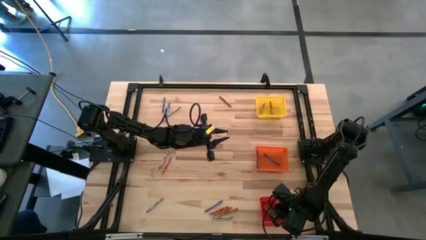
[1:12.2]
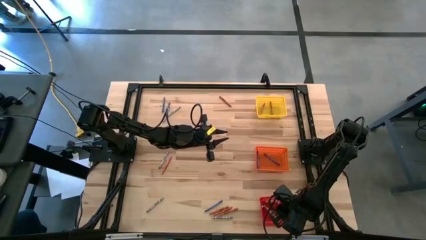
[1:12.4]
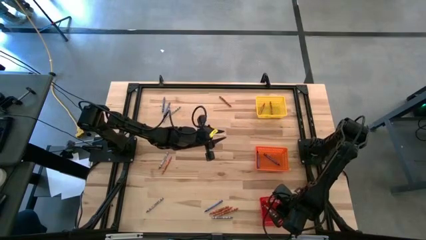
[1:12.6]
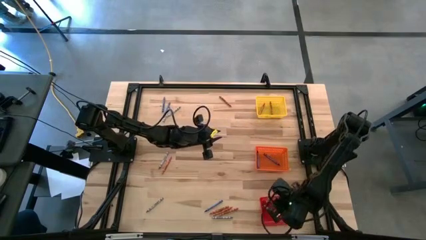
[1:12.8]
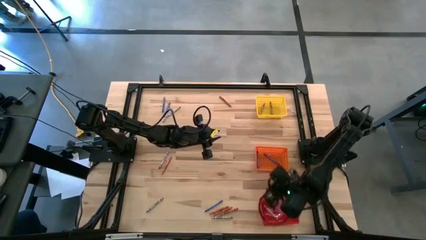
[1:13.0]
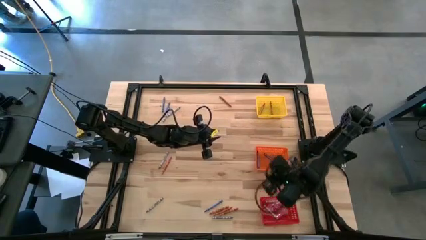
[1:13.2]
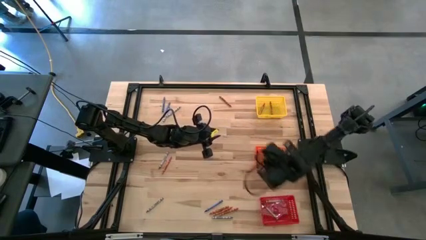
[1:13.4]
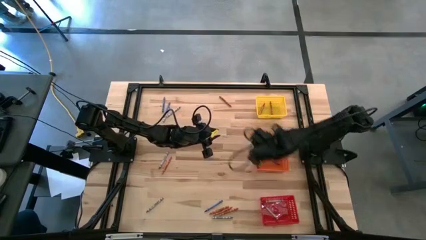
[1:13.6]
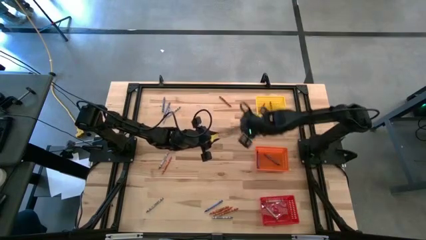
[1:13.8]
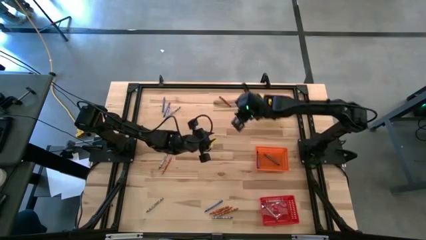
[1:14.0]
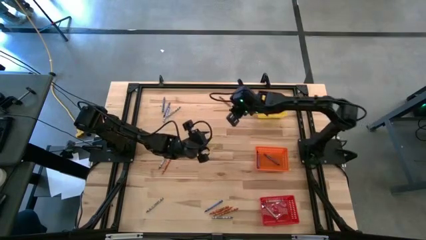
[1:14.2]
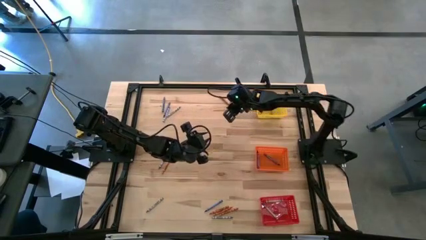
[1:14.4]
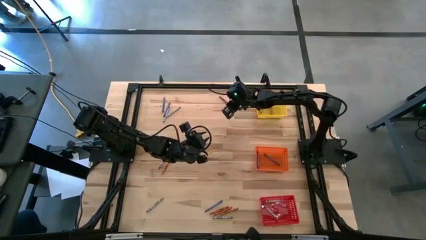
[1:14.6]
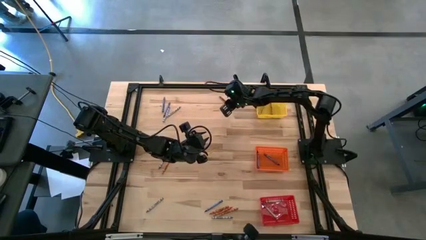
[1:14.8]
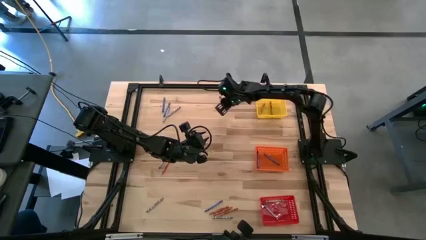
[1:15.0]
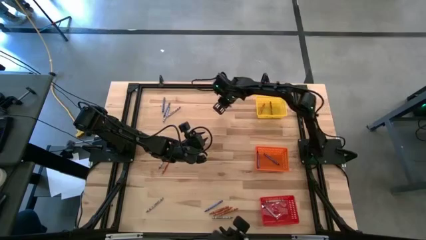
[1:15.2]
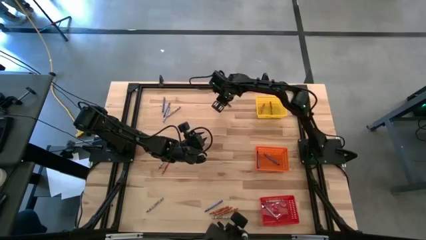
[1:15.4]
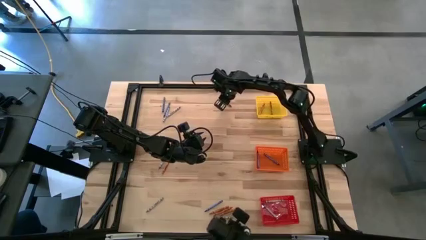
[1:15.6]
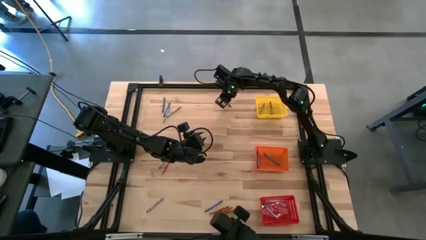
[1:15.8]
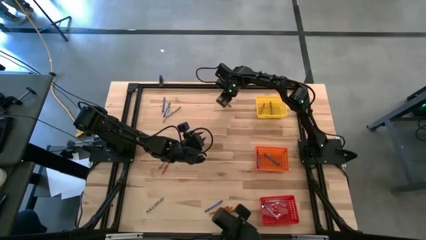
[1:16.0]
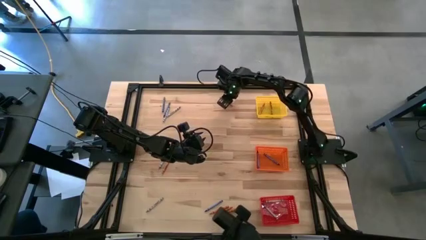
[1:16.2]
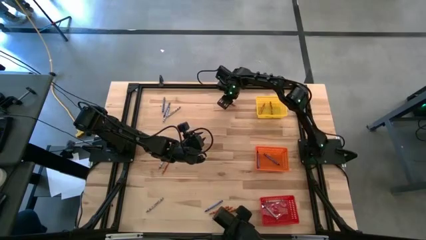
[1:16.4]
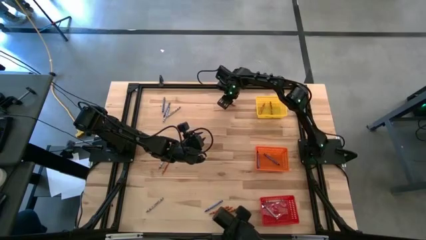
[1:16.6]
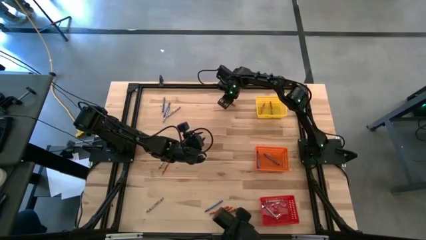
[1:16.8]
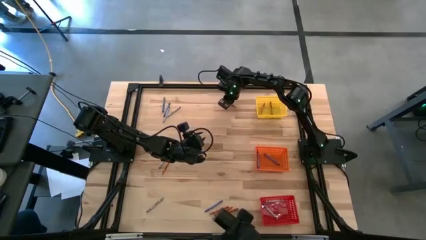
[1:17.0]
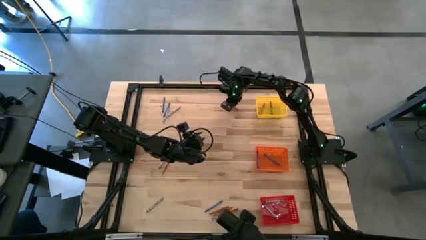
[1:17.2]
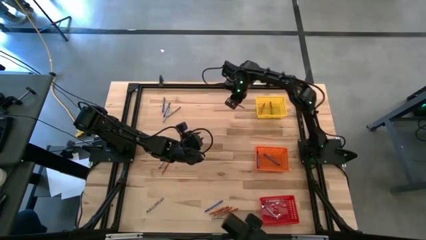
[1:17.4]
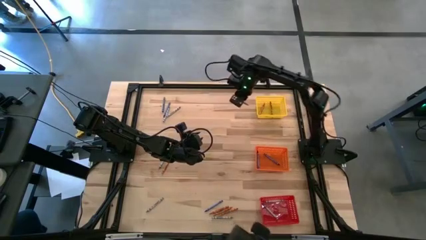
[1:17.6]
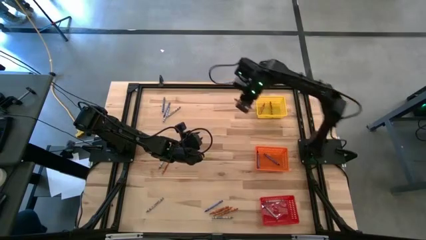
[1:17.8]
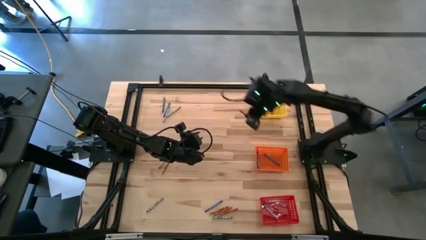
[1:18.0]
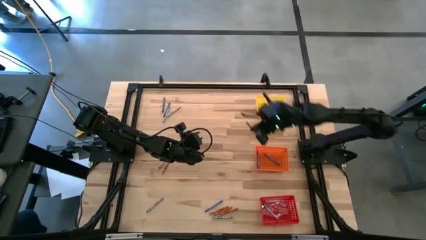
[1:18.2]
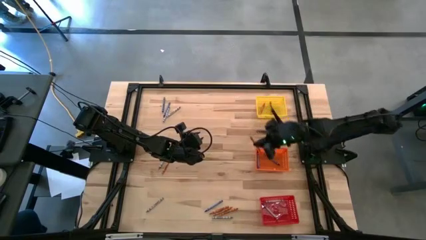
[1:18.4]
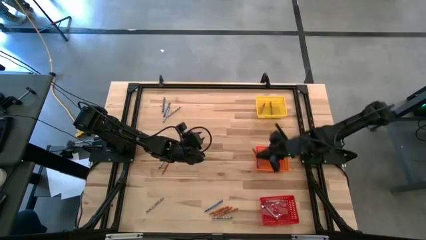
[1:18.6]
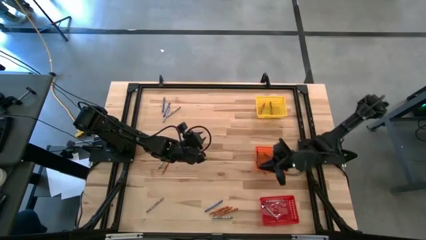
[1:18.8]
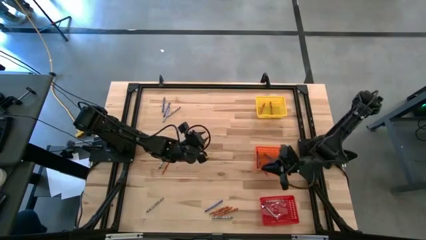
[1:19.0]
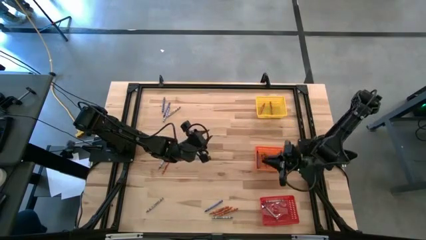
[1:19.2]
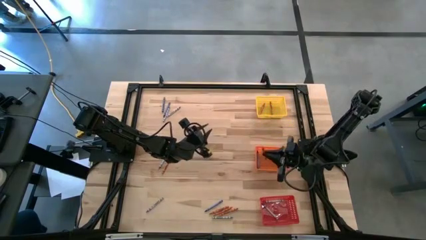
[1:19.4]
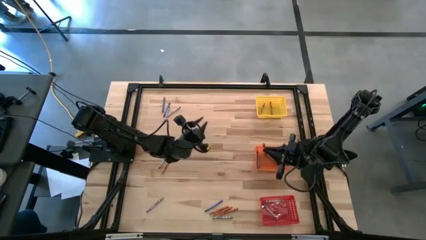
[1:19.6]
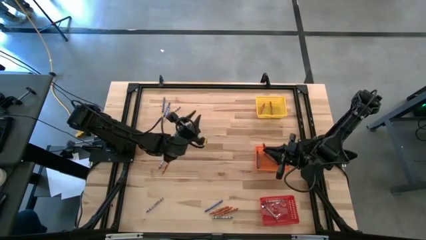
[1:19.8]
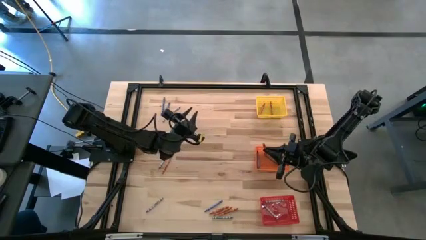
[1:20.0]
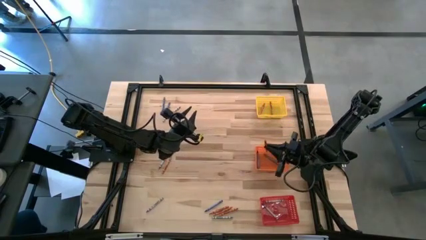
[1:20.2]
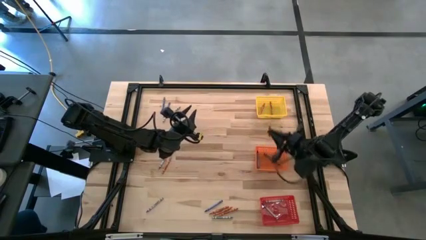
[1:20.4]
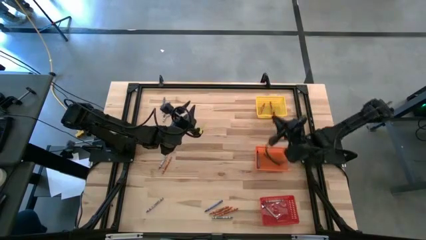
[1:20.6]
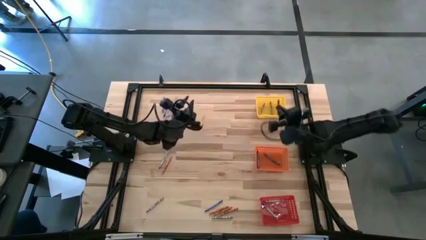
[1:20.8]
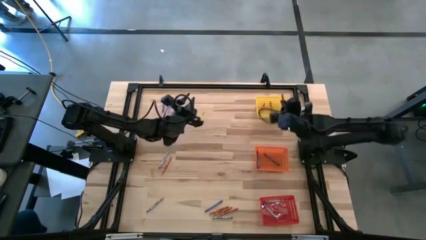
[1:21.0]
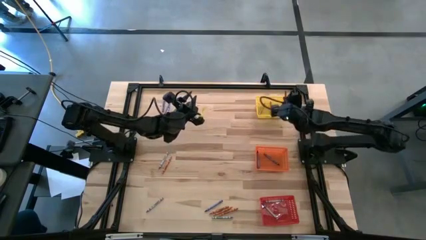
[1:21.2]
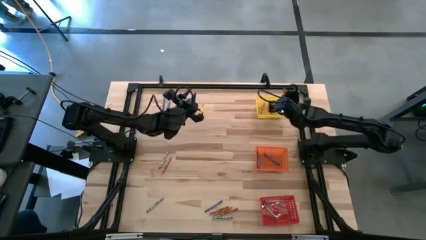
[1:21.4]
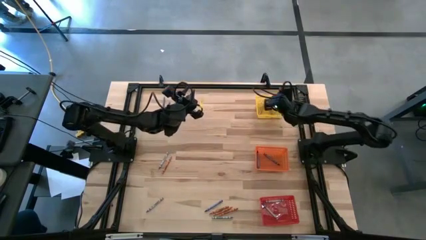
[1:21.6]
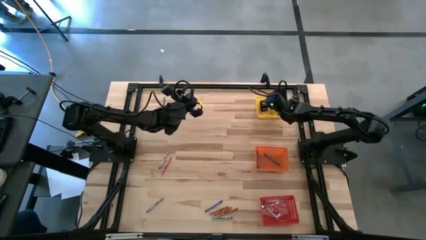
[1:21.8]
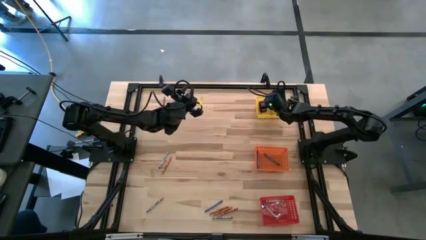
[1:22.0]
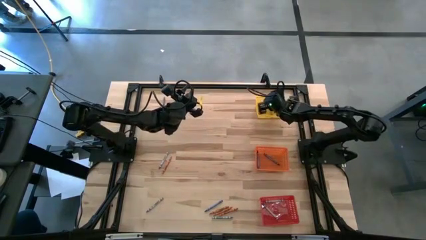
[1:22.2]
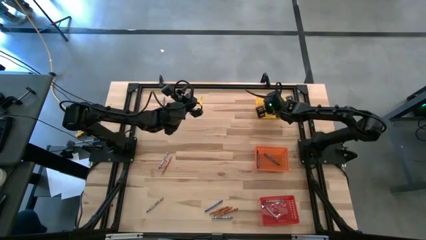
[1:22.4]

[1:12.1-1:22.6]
Task: Sort crayons
Put the orange crayon into the yellow bin

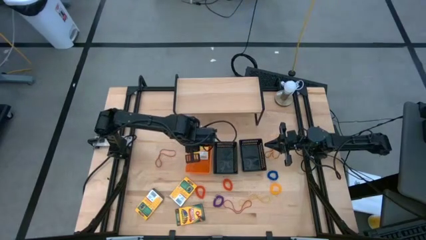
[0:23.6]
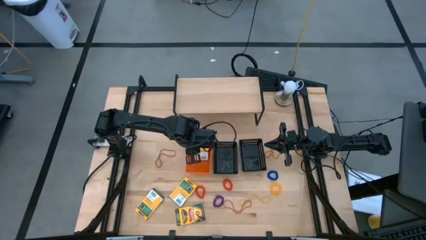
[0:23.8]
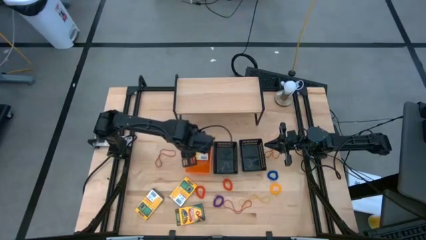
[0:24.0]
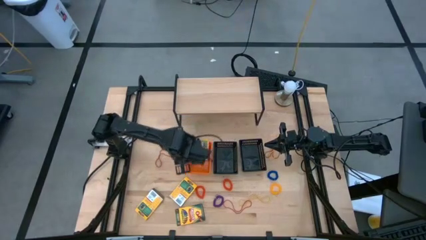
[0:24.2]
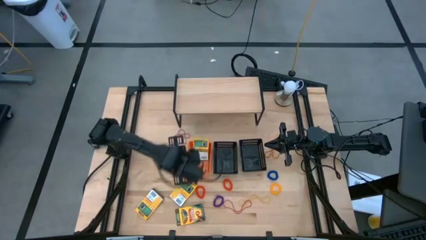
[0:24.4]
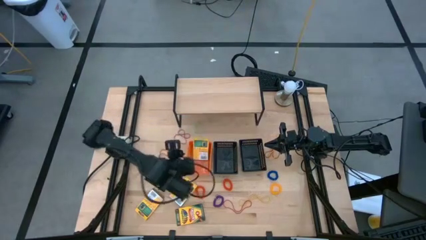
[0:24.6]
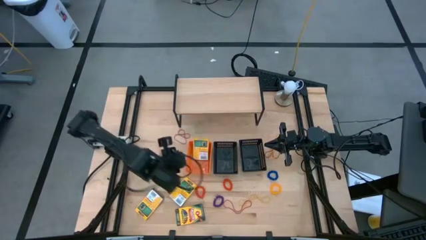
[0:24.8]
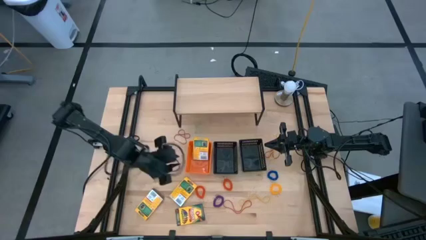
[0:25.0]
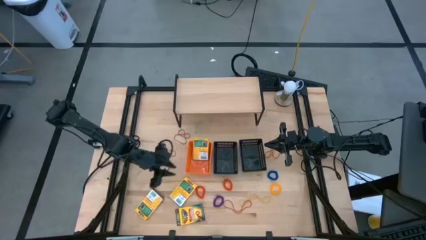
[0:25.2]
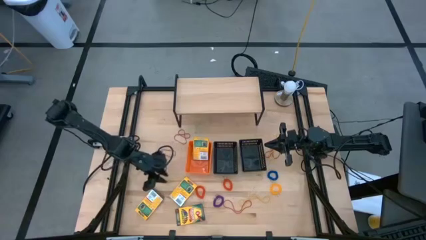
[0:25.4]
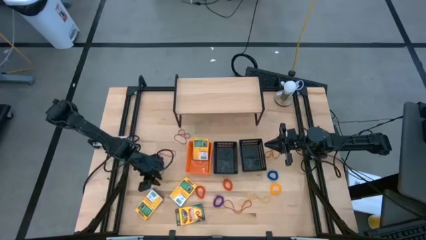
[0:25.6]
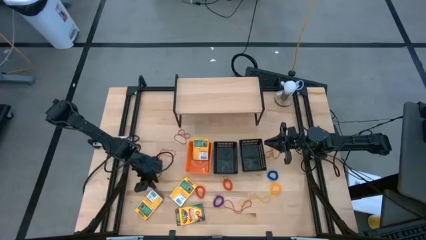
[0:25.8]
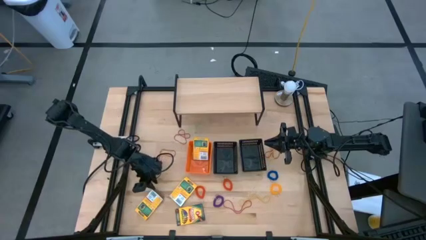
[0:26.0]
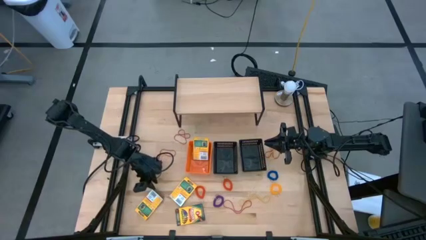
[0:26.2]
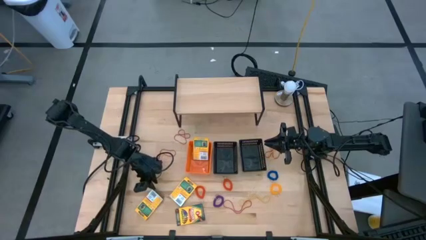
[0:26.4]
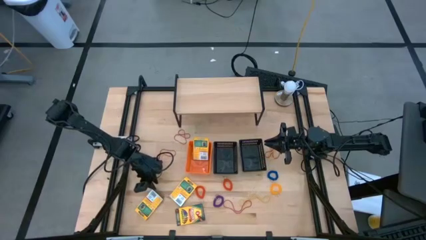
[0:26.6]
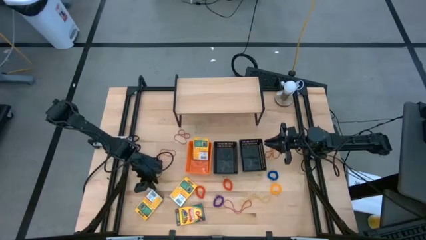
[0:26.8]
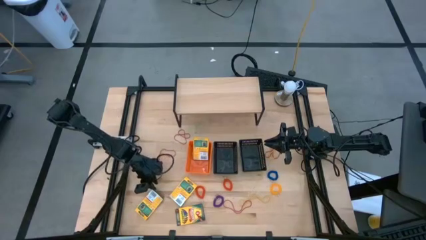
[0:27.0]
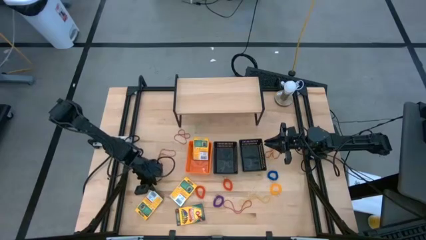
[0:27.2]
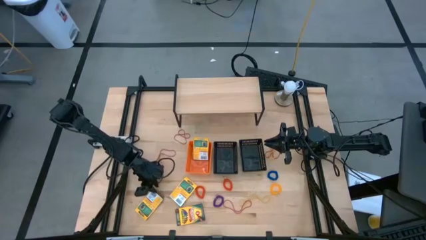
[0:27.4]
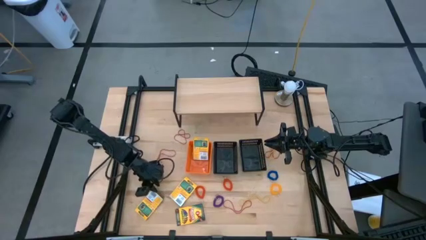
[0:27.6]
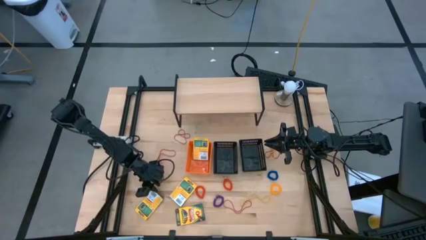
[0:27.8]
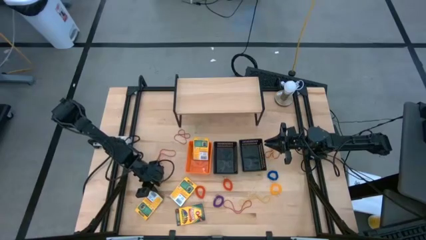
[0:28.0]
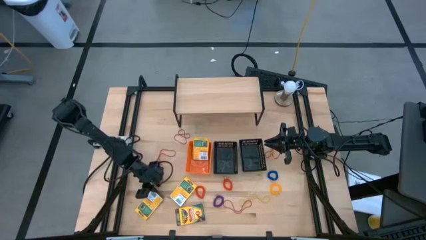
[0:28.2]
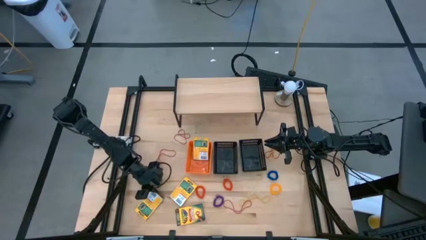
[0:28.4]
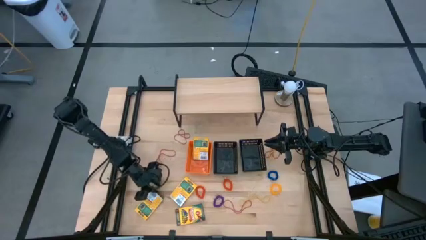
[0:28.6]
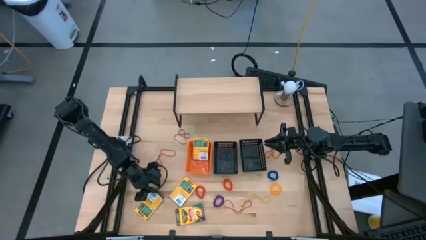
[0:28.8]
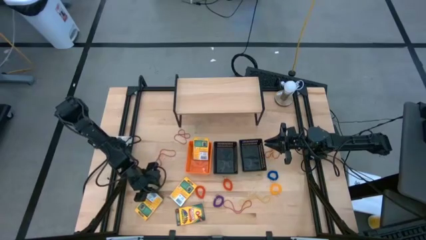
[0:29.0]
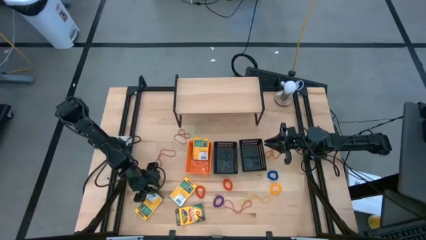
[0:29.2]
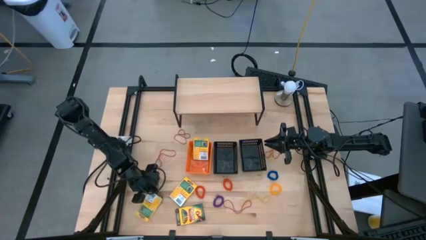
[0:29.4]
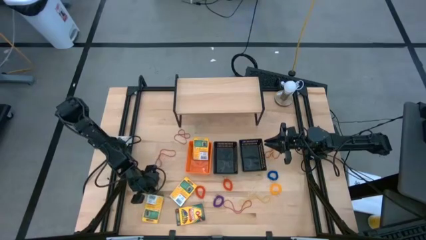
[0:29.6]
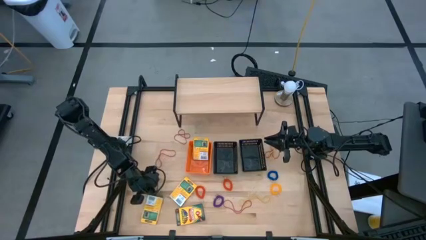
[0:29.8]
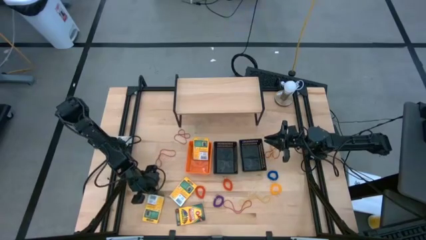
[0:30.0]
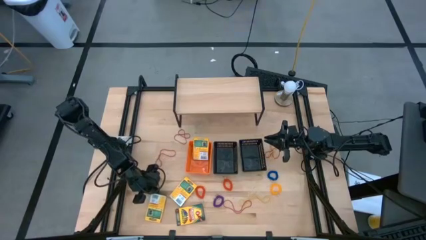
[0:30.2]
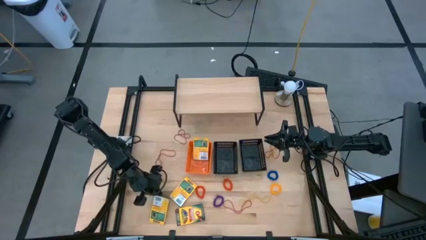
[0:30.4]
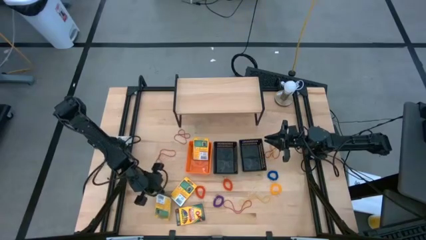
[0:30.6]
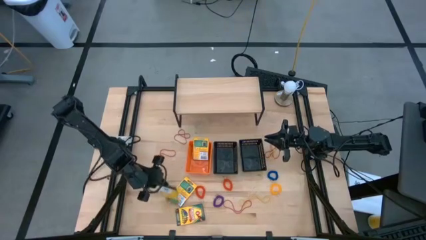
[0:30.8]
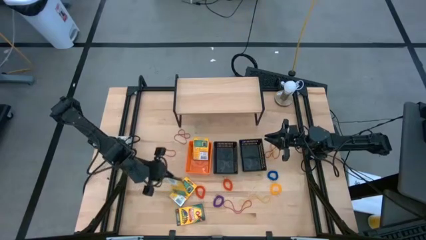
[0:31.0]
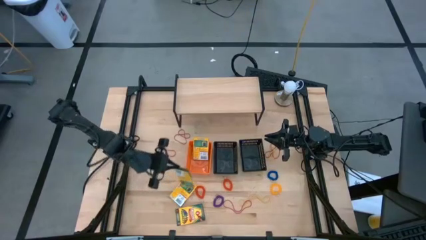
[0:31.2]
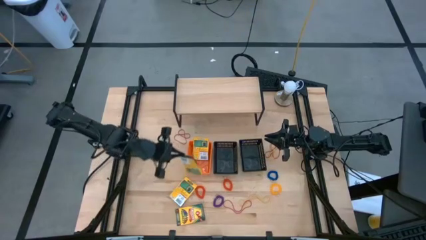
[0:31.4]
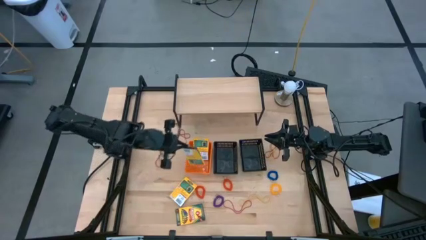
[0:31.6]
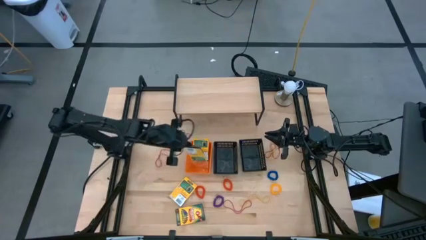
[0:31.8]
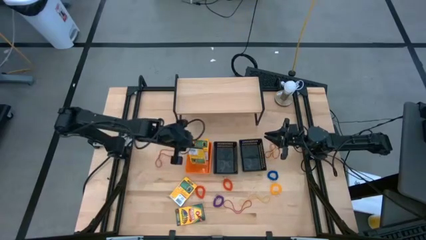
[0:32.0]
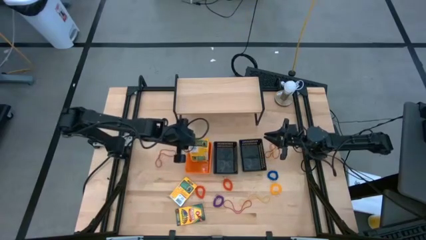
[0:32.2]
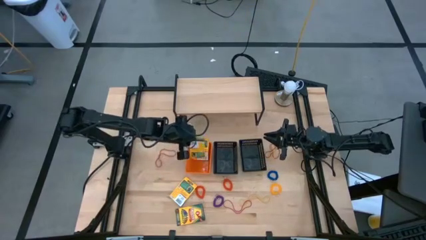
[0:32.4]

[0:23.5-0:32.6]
Task: Pick & Place Office Desk Supplies
Put the yellow crayon box into the orange bin
